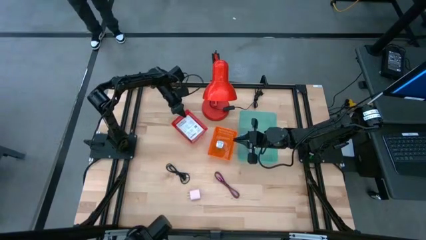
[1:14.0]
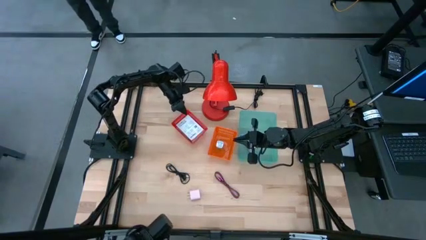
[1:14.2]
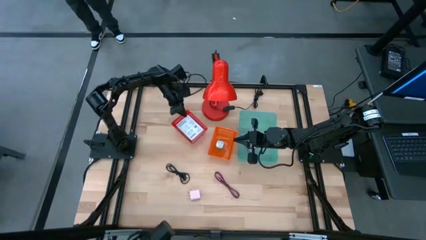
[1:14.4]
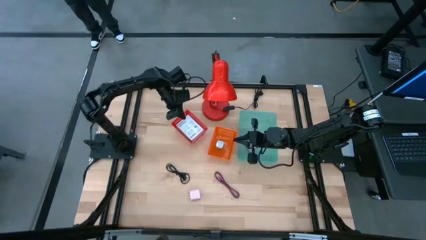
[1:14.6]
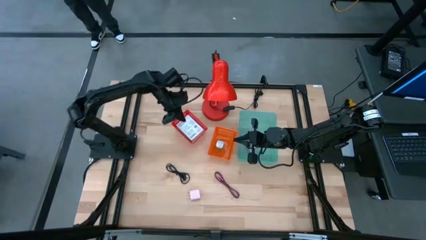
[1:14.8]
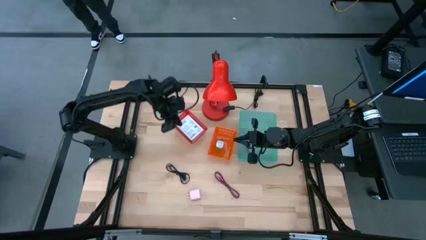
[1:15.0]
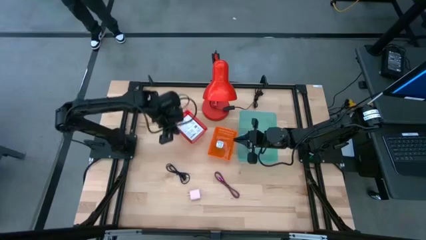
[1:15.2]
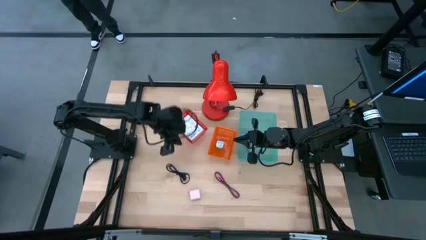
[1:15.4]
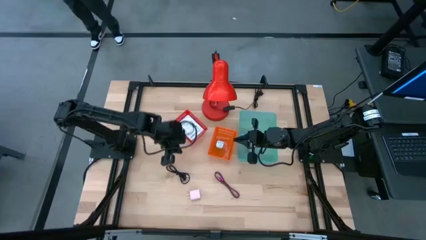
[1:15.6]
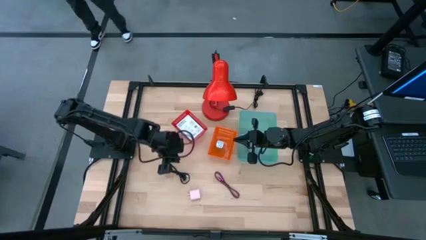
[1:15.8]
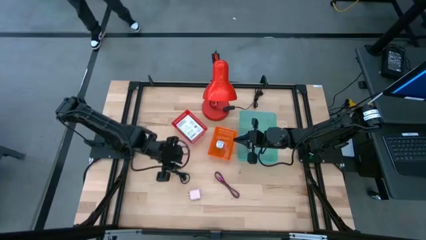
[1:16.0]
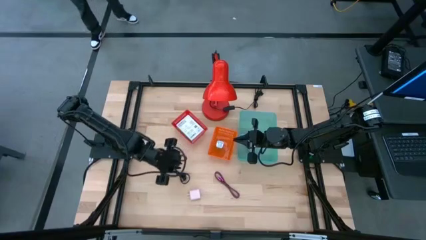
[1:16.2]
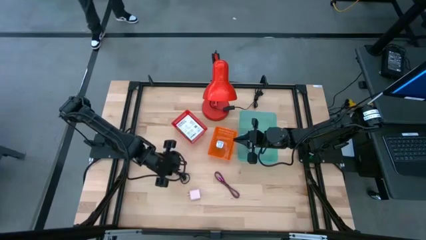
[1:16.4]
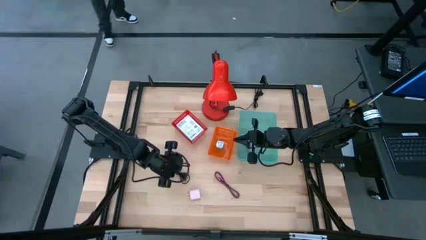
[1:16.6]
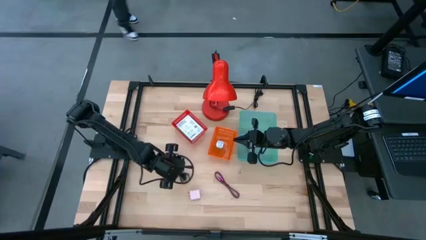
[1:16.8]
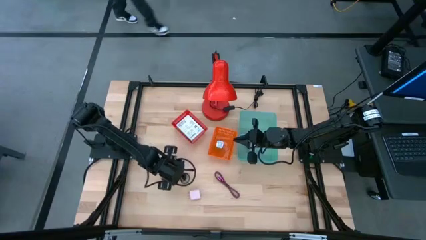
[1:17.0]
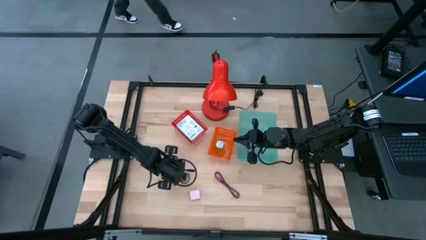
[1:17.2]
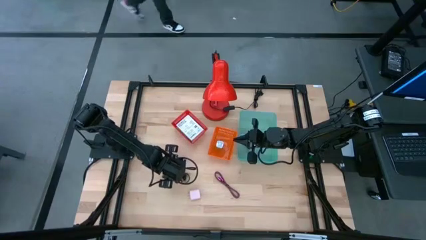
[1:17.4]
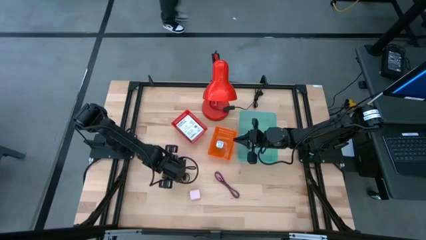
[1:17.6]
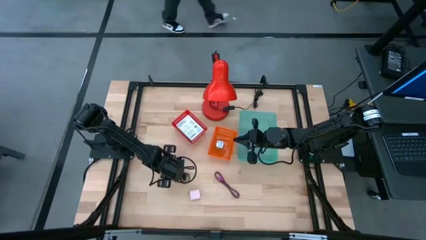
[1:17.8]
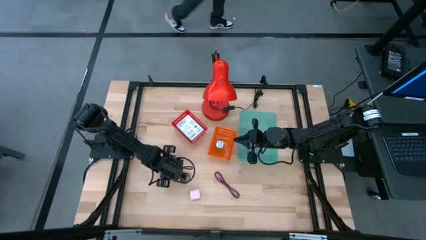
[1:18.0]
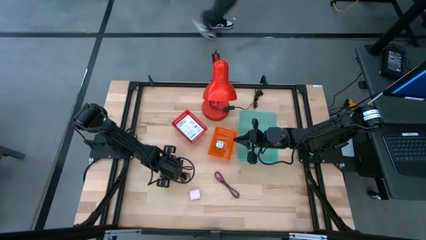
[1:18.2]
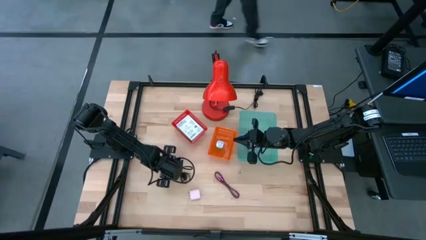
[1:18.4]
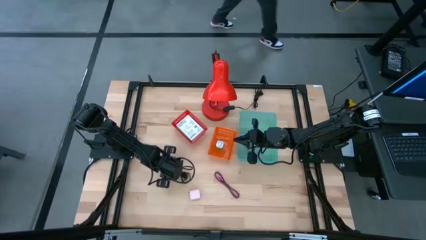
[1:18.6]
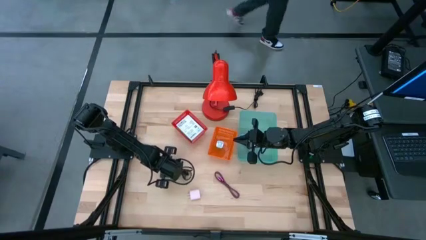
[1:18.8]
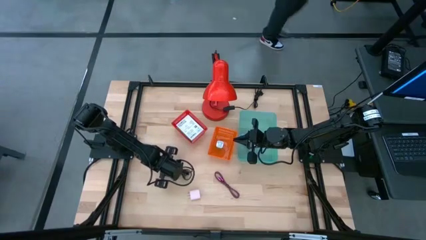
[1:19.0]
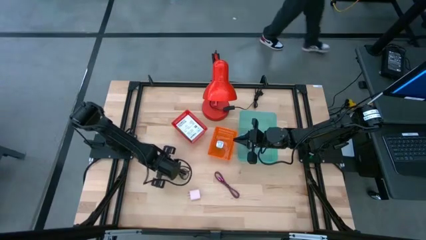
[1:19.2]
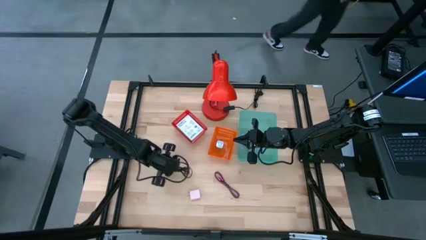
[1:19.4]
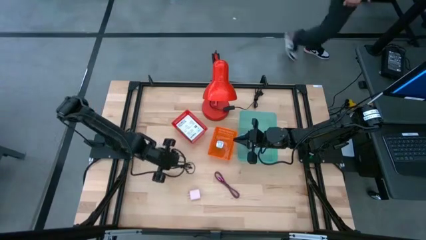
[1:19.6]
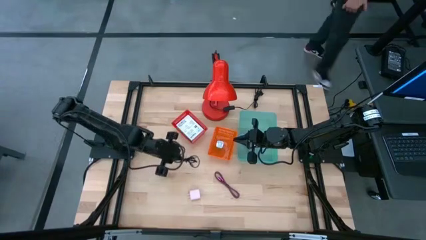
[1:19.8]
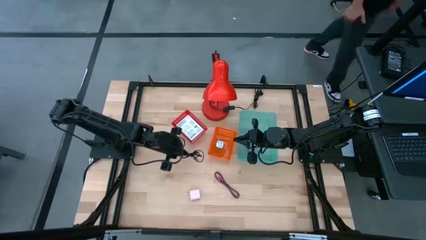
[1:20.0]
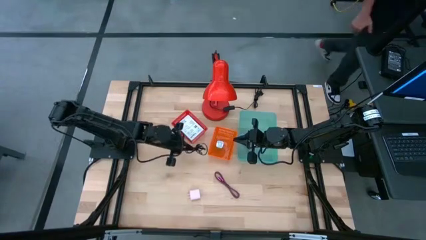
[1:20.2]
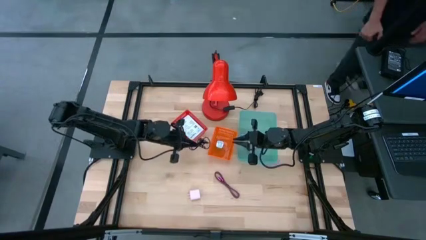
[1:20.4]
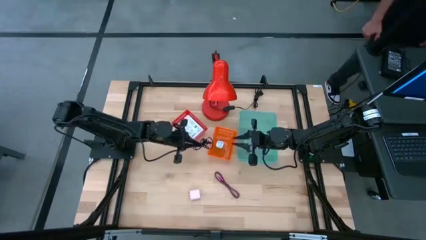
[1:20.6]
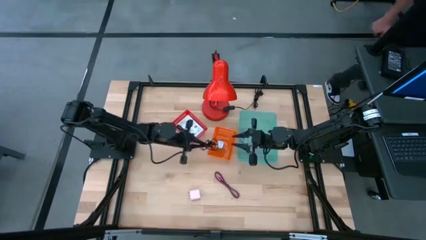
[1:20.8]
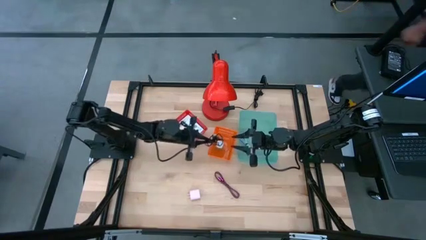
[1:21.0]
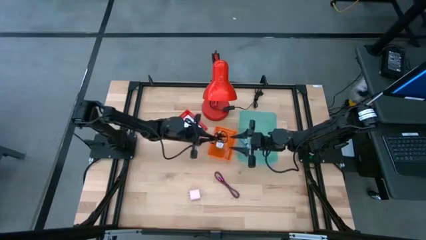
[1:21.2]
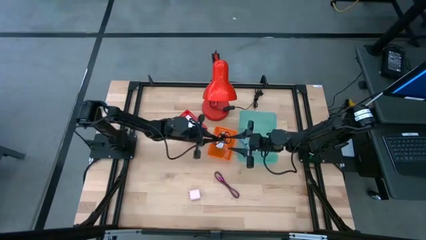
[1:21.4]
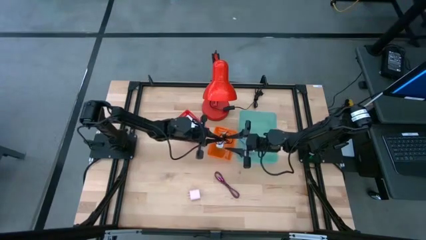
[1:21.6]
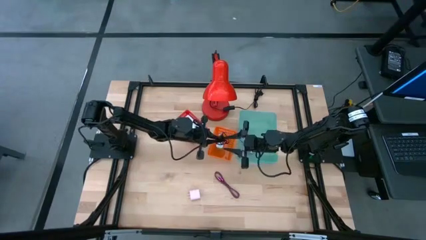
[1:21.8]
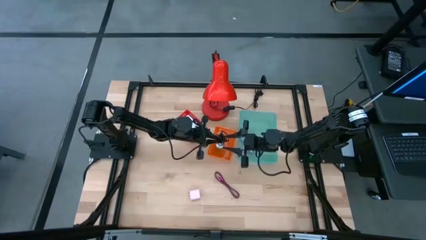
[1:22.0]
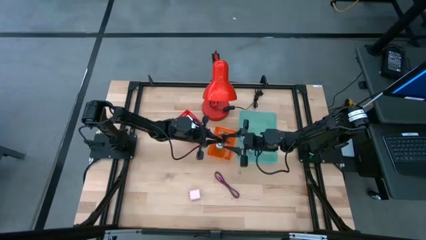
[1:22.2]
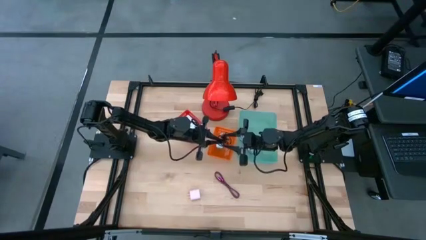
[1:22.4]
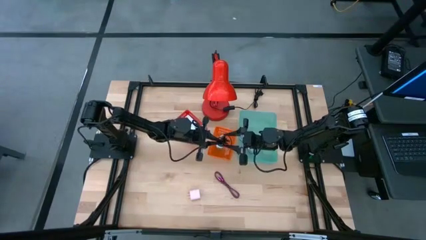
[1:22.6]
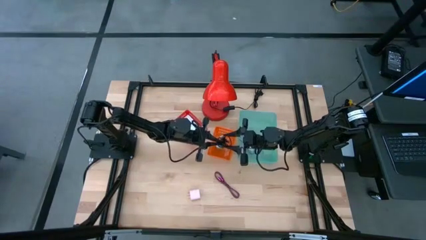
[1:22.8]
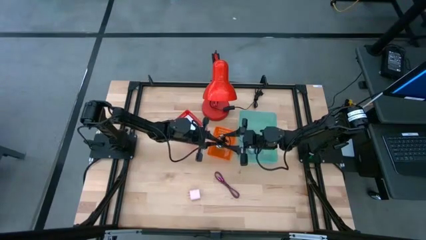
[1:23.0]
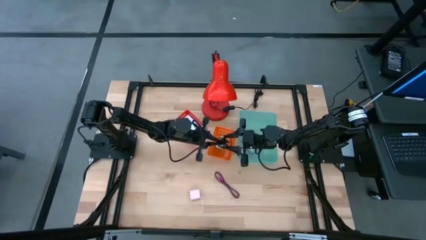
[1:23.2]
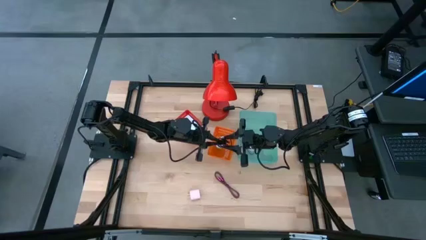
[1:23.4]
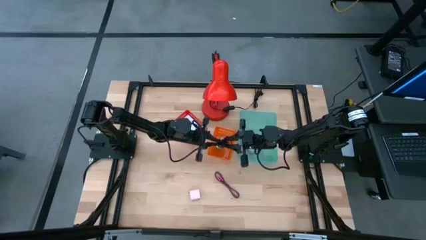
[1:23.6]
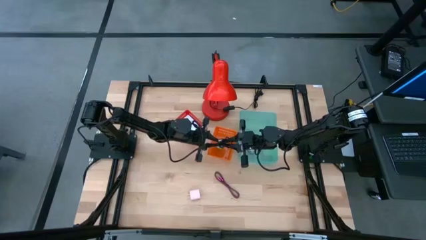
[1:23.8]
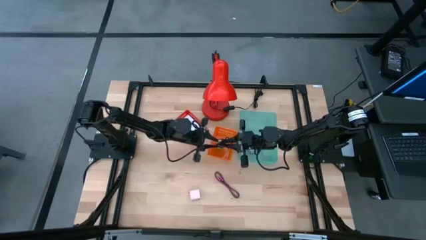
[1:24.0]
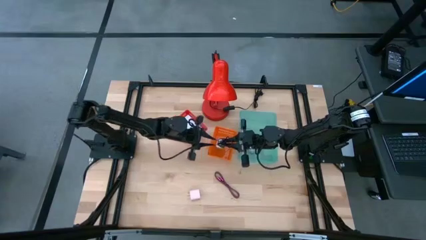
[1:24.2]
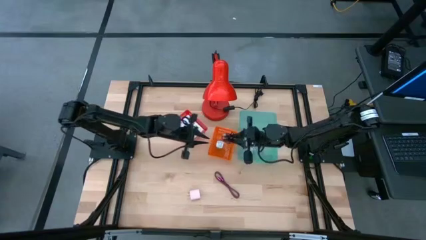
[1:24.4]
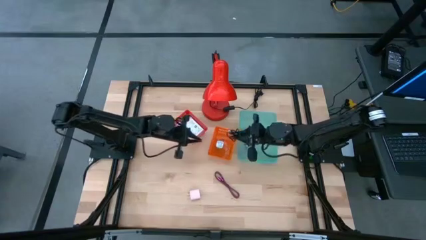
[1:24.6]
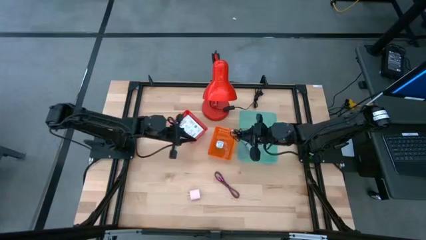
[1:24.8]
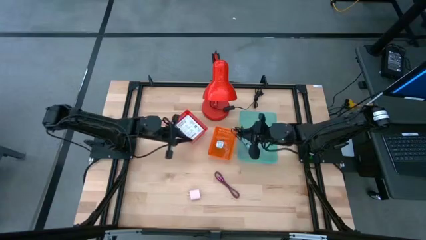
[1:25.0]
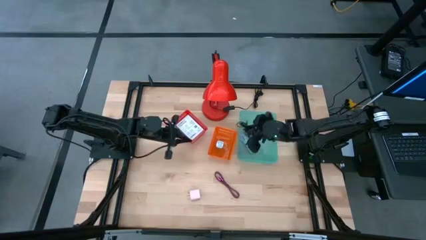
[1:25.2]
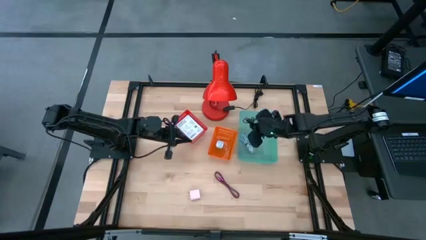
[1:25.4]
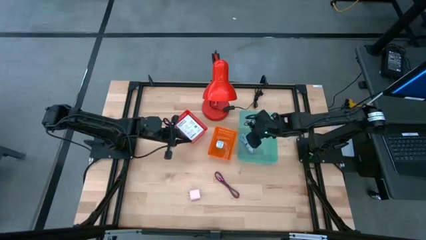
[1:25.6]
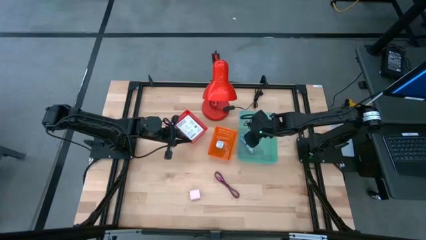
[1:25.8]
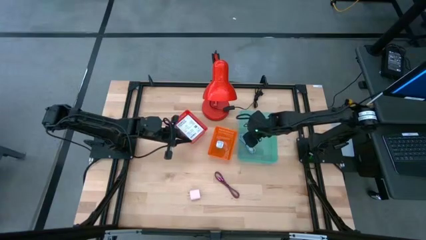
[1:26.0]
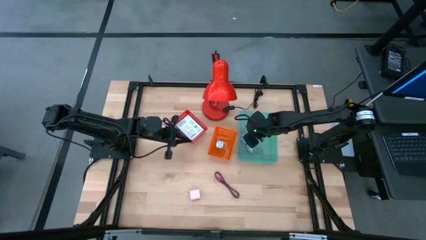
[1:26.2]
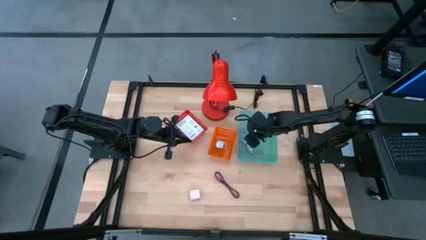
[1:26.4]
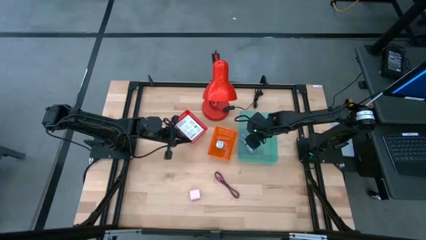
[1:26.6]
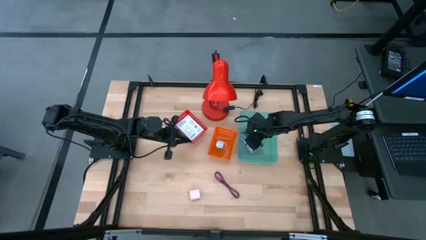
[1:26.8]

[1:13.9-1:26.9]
Task: Pick and place items into bin
Put the black charger cable into the green bin

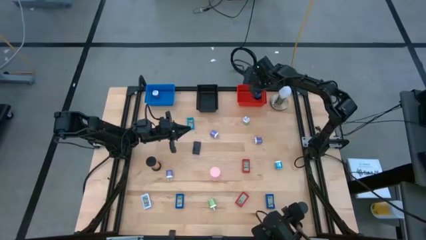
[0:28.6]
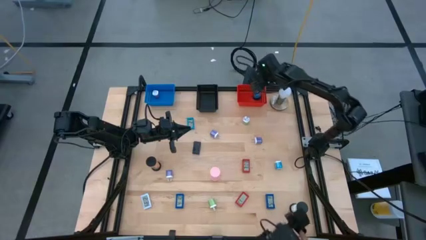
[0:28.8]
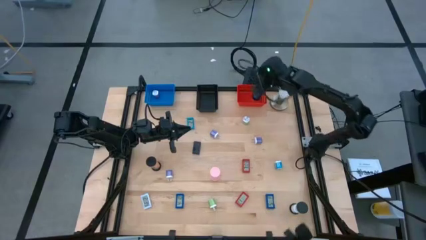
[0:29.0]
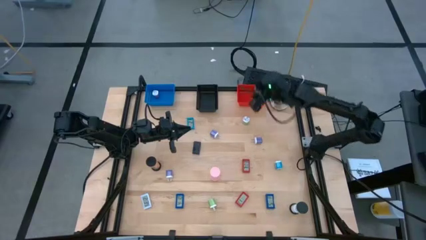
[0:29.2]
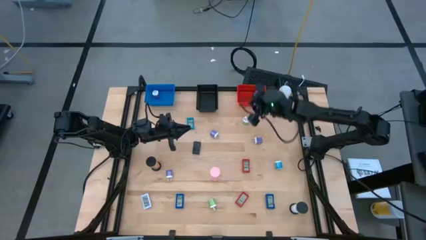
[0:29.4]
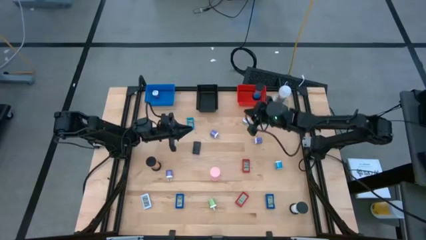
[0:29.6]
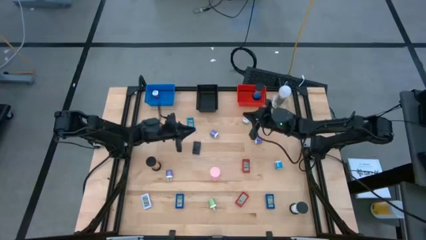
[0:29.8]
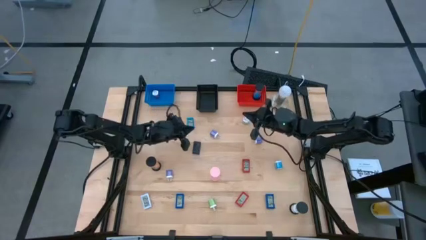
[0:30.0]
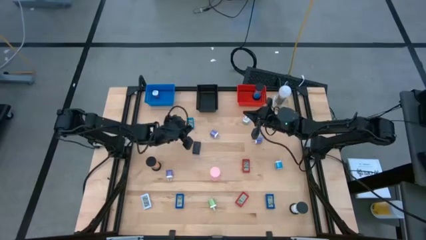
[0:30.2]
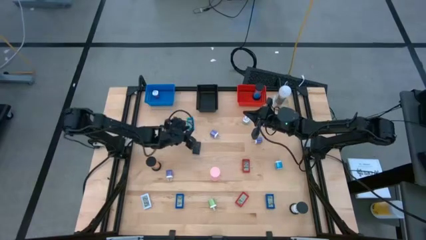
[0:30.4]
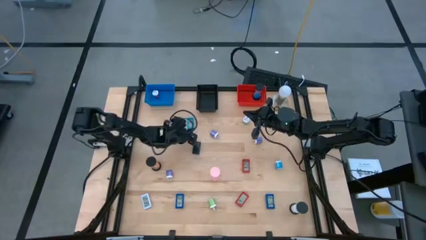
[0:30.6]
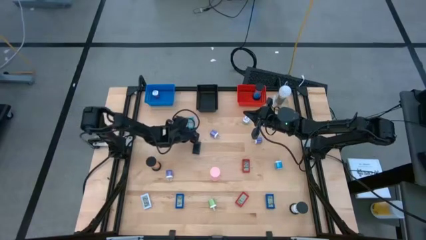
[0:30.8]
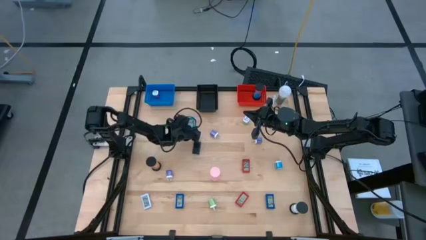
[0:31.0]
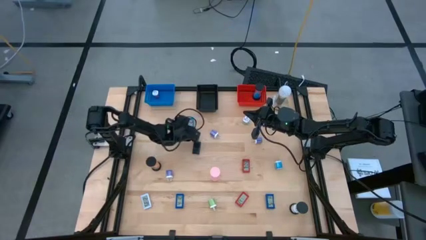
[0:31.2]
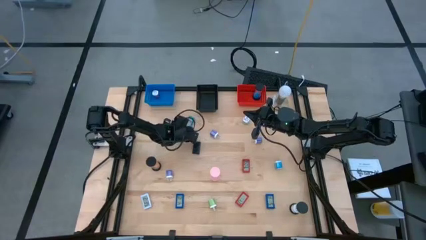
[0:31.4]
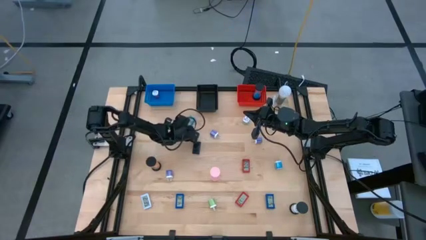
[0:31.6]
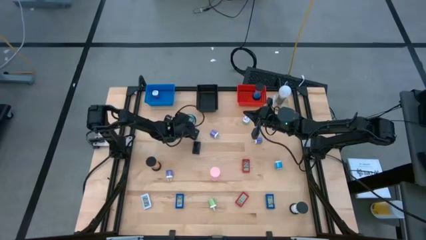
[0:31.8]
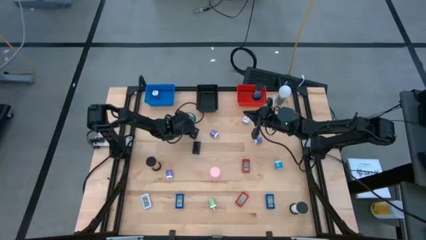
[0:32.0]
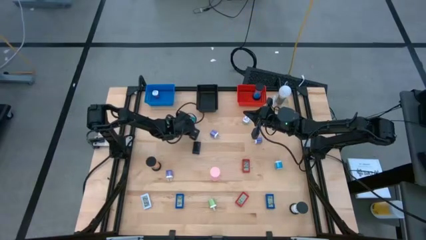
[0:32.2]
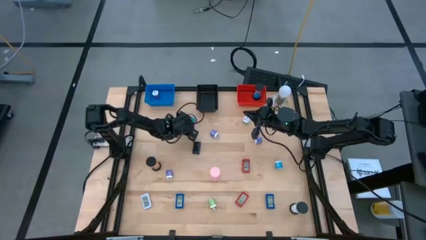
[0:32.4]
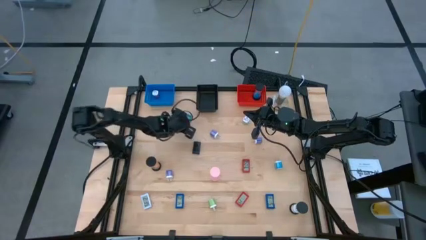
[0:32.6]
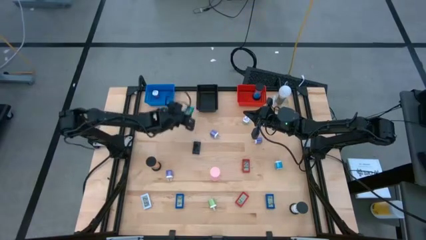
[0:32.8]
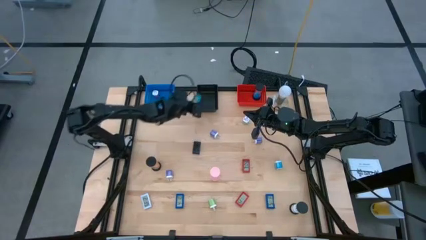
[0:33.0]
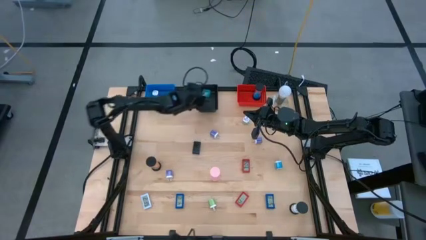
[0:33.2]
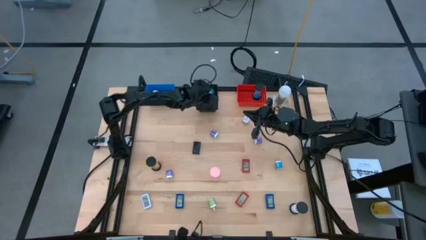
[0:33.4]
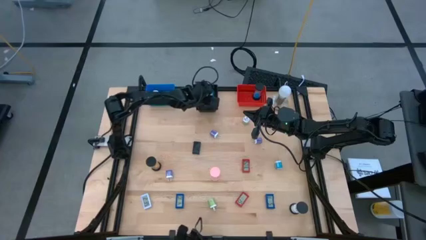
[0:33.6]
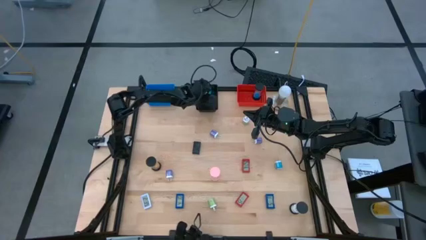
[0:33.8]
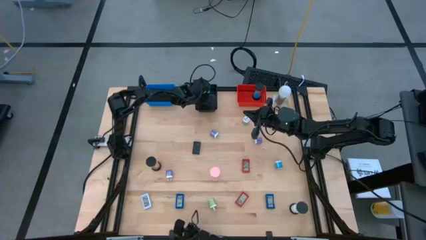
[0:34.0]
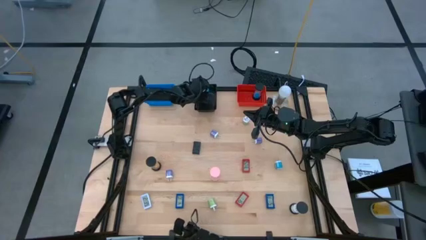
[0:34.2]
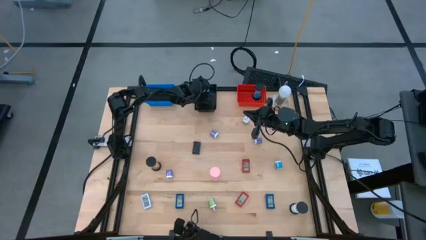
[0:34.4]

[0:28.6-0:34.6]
Task: Pick & Place Office items
Put the light blue digital clock into the black bin
